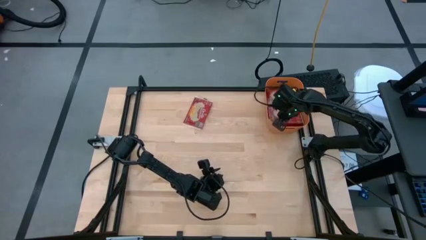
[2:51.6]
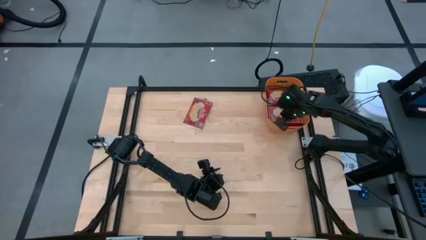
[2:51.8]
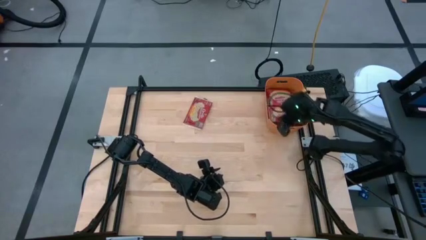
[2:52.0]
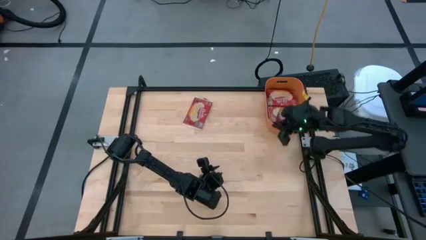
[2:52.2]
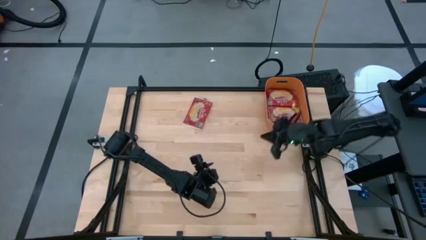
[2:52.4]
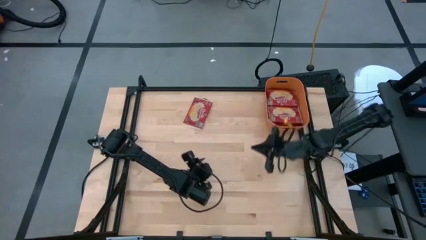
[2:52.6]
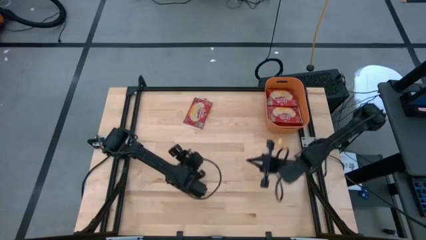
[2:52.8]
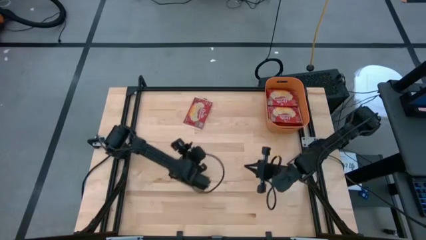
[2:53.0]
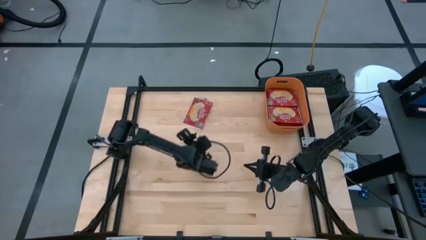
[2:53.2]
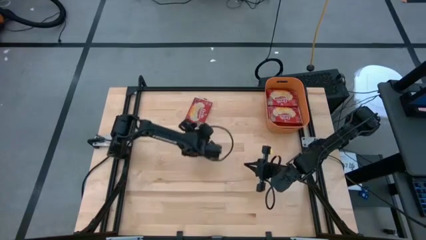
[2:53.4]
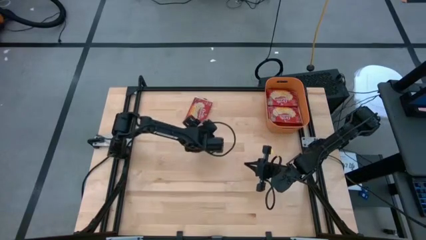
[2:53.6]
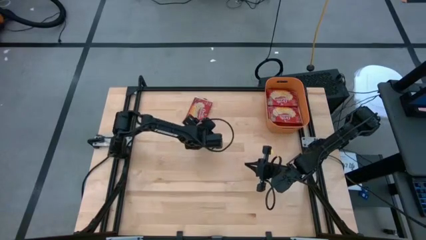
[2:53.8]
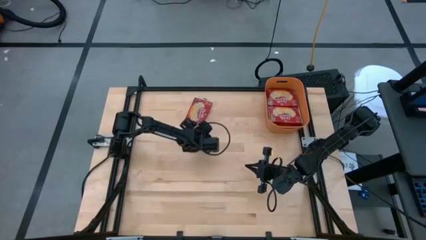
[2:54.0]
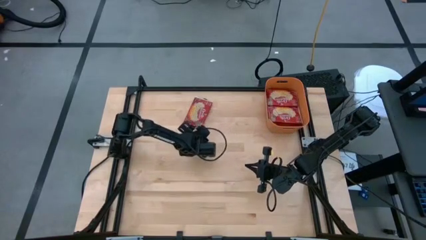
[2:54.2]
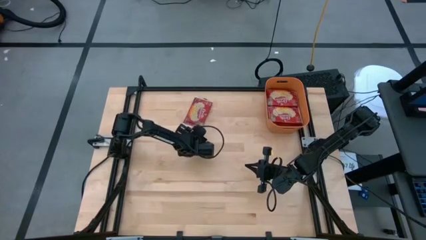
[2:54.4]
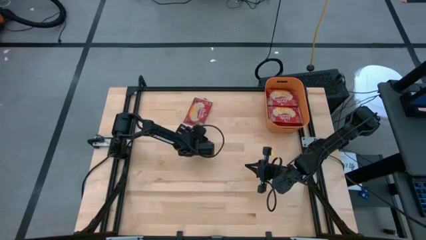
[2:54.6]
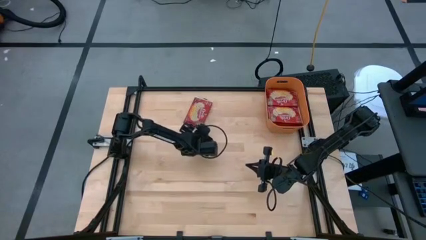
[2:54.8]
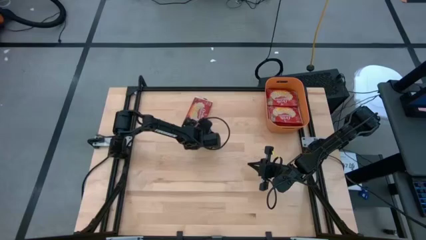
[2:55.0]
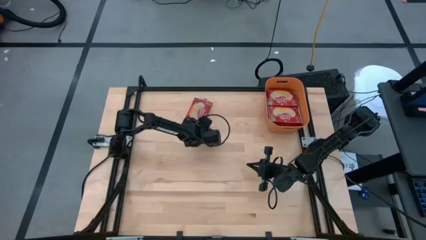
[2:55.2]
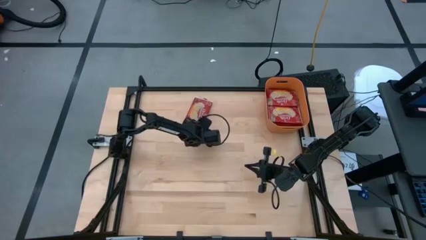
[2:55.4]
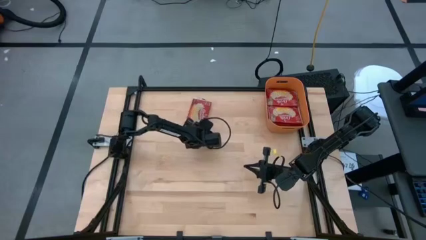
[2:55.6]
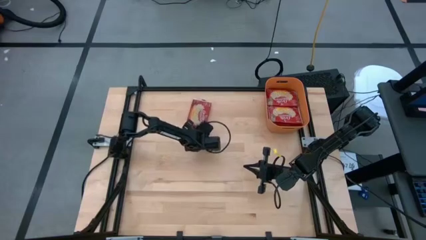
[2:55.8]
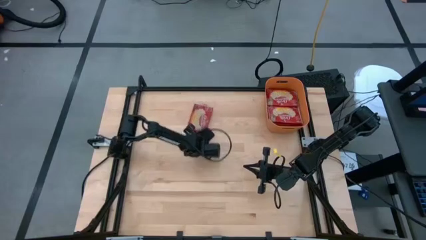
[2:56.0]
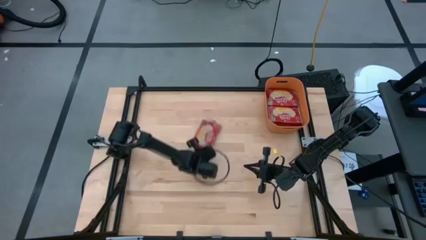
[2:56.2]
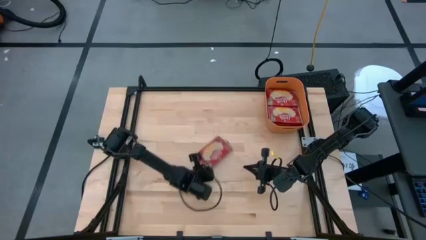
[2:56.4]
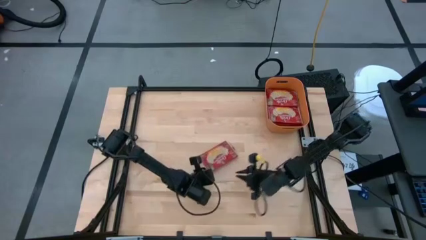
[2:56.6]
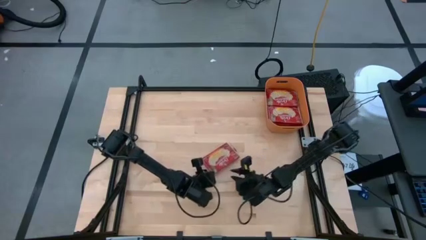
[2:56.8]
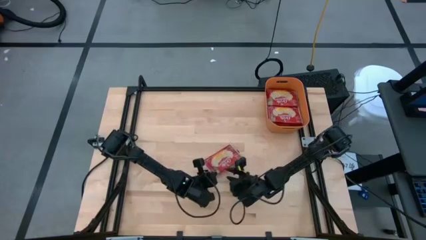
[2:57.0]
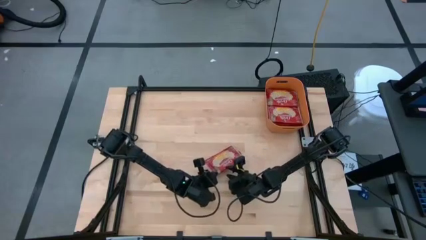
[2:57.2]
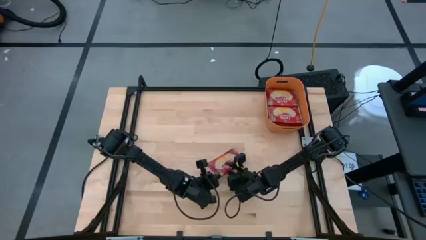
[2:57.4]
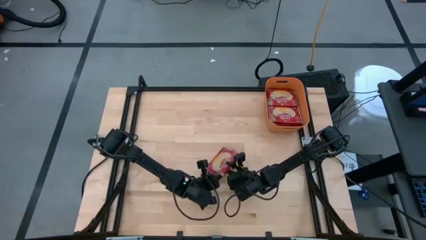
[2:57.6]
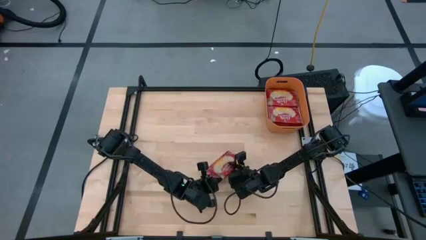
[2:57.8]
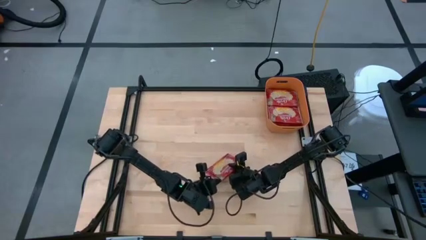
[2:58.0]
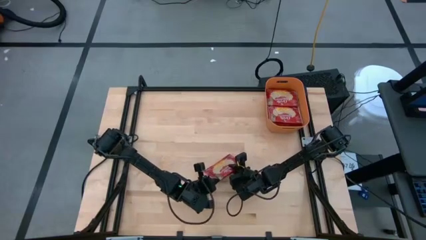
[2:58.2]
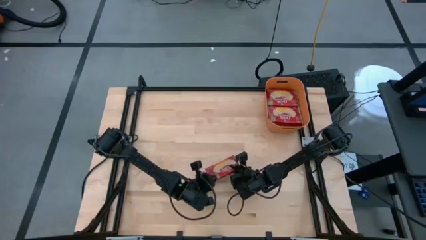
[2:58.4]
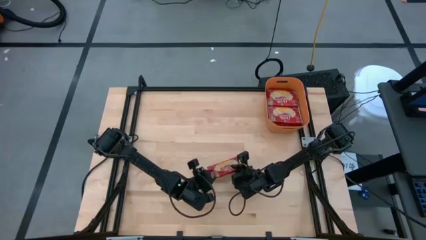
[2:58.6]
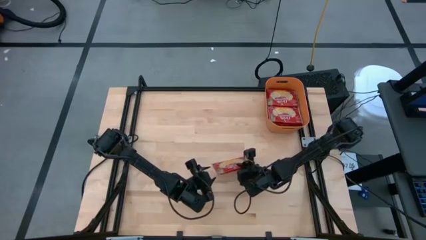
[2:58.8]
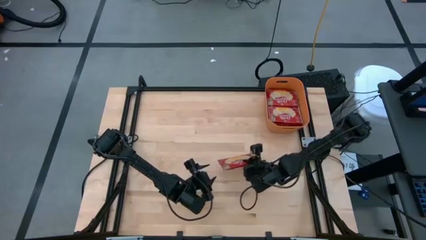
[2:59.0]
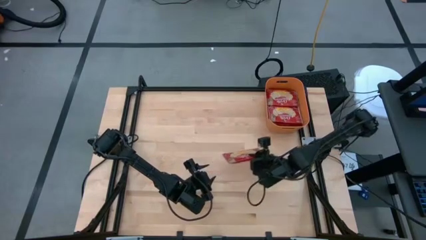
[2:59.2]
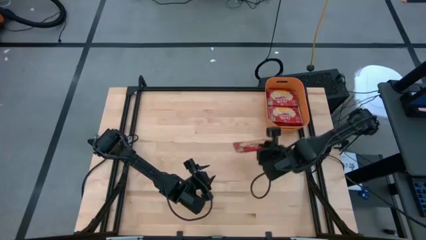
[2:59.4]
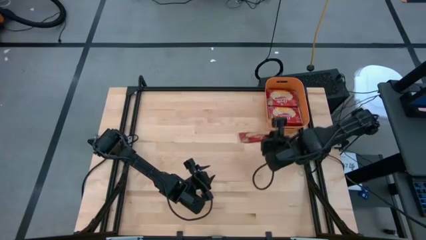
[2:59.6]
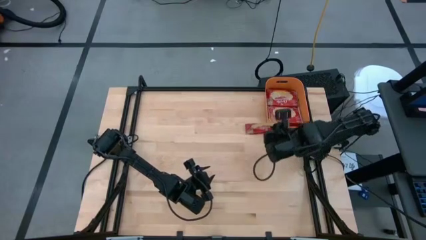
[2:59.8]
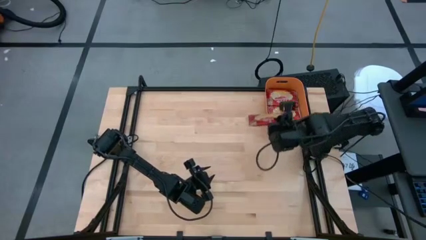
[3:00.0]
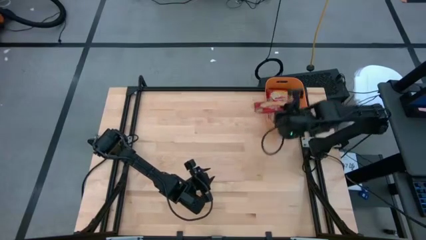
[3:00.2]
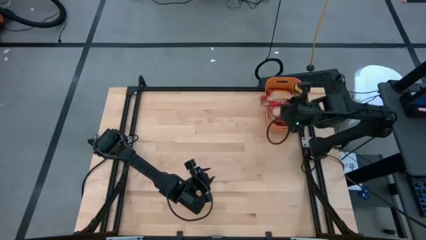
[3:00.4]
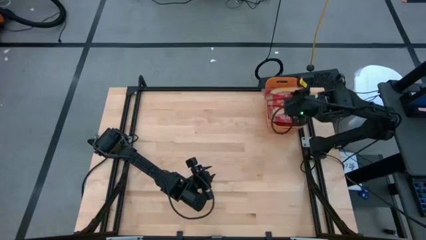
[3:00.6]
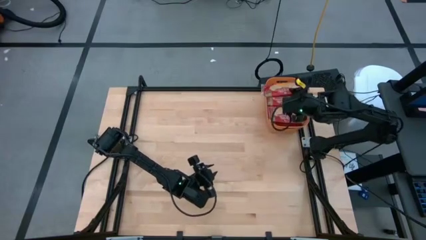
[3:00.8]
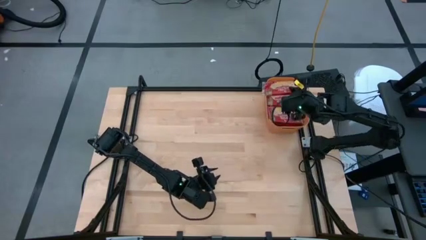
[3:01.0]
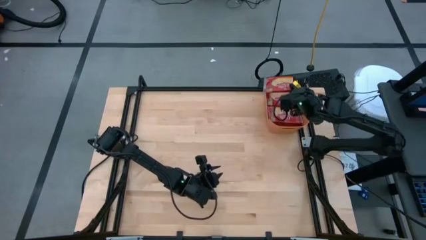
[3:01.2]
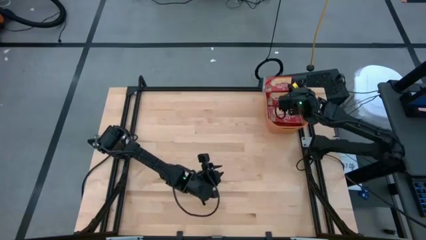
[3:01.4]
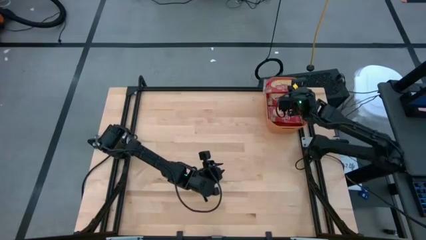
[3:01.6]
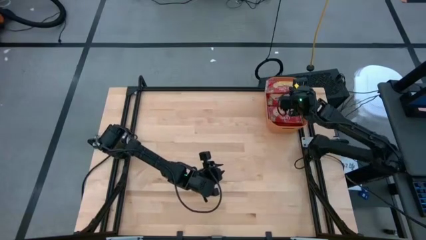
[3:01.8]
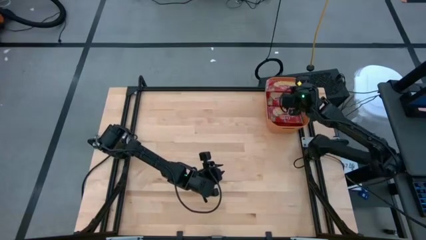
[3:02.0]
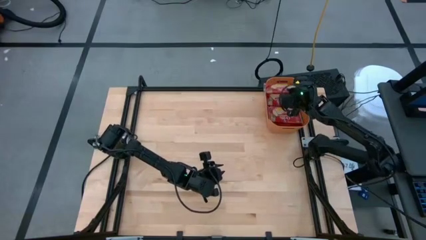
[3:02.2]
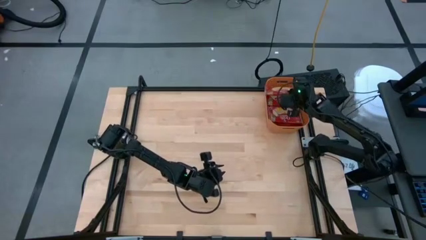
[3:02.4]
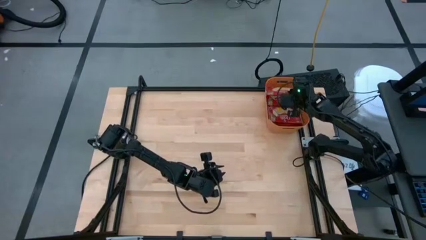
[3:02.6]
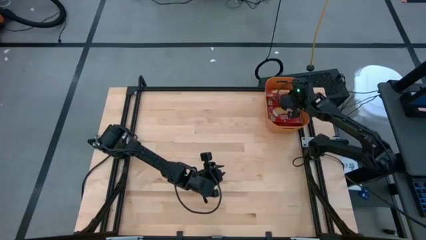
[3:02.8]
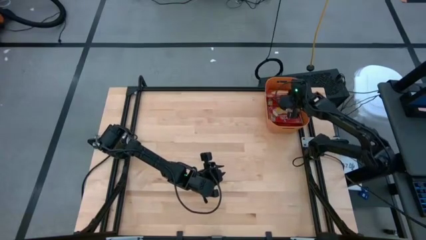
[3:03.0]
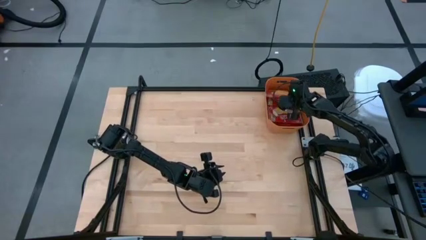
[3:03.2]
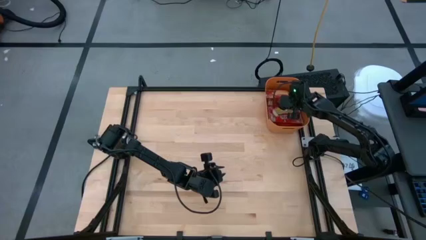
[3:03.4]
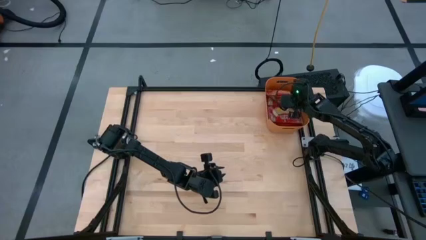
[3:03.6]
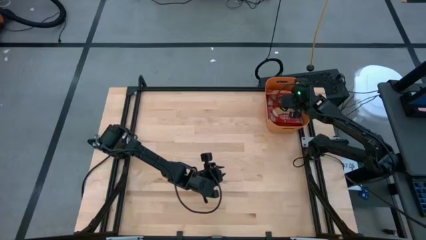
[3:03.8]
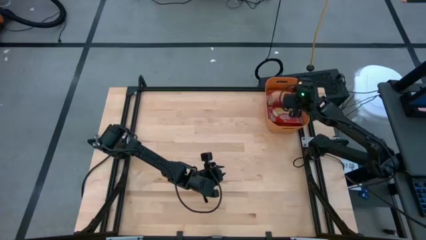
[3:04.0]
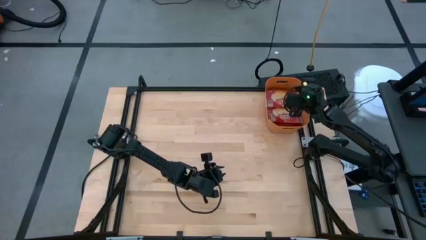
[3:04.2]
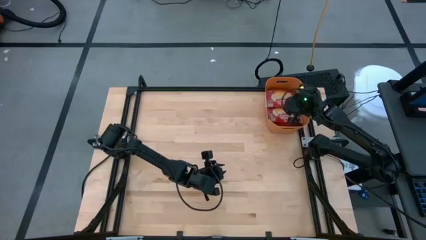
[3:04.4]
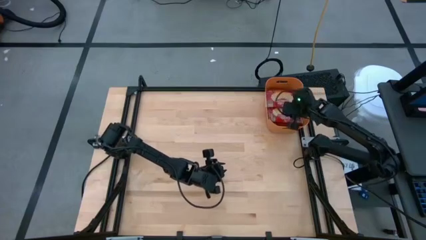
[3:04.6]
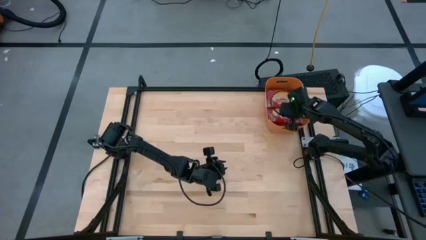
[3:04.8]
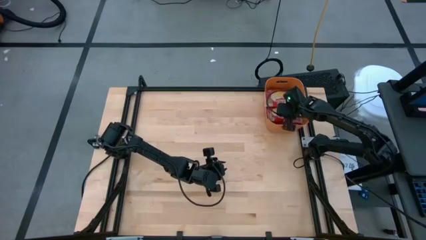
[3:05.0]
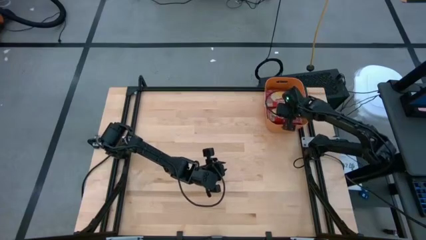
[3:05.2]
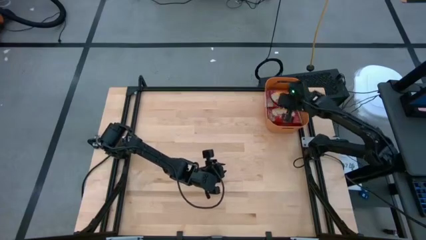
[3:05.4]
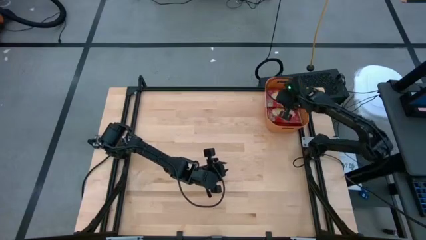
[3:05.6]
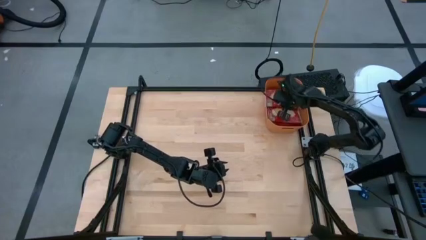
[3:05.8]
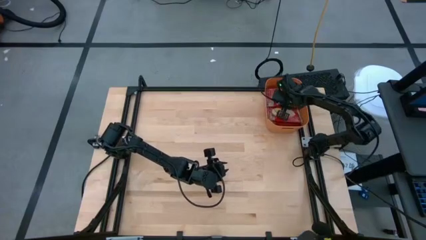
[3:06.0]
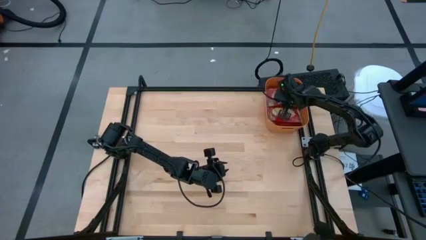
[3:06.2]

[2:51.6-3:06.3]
Task: Sort popcorn bags into baskets
Put the red popcorn bag into the orange container

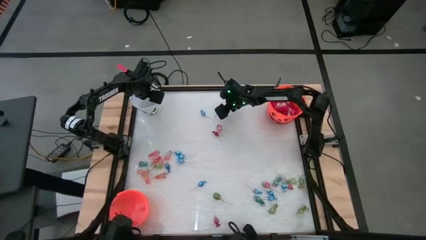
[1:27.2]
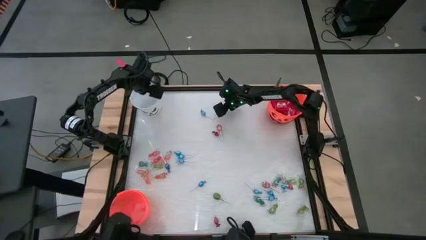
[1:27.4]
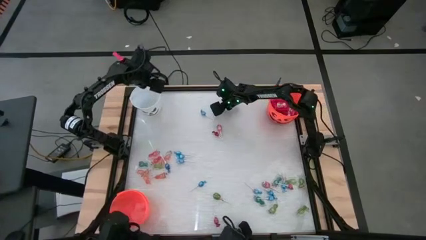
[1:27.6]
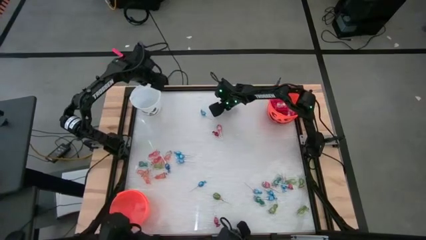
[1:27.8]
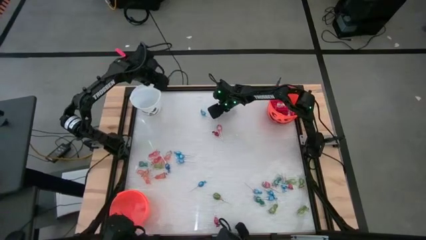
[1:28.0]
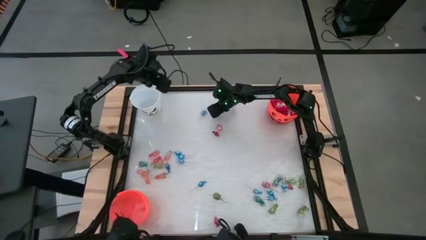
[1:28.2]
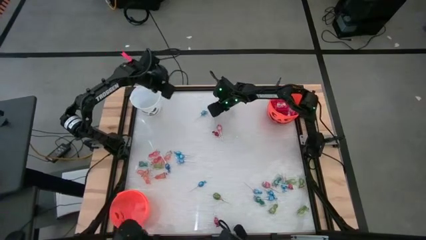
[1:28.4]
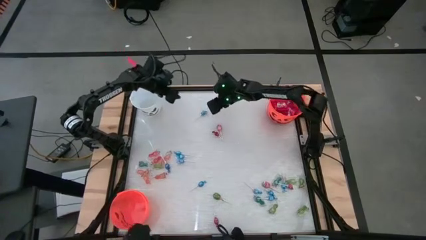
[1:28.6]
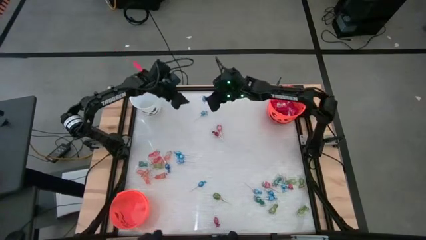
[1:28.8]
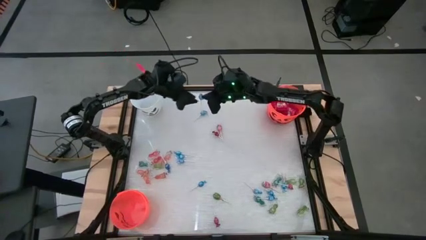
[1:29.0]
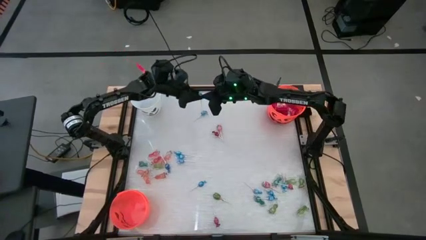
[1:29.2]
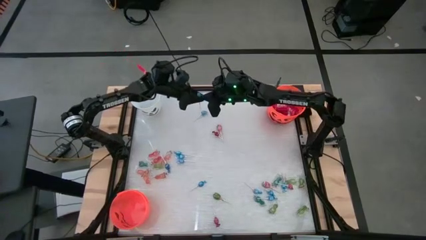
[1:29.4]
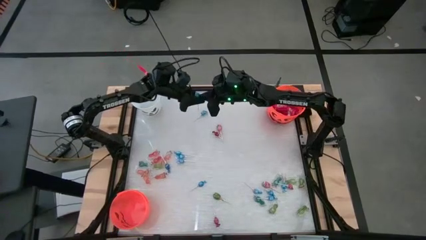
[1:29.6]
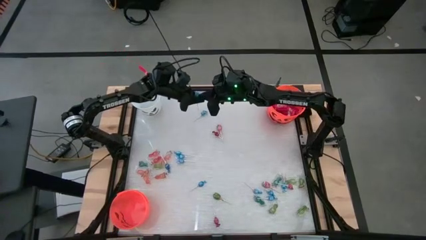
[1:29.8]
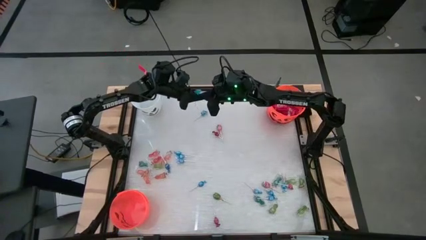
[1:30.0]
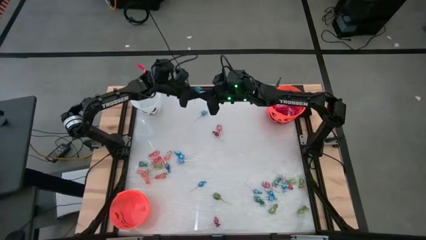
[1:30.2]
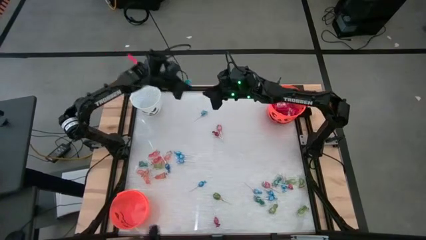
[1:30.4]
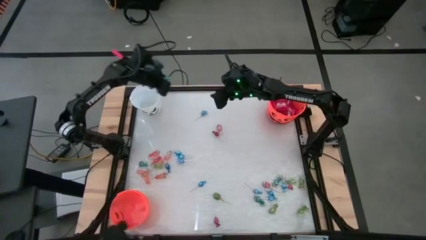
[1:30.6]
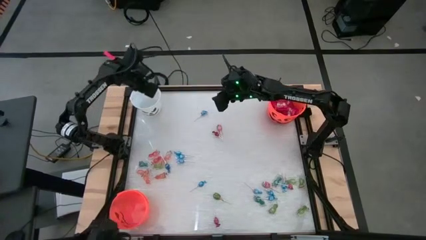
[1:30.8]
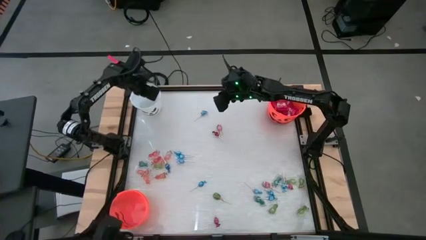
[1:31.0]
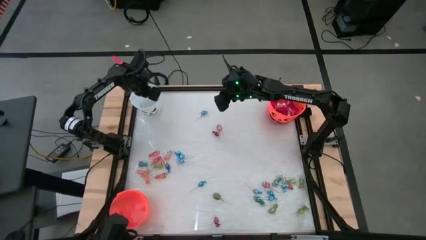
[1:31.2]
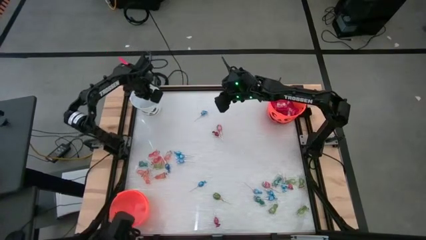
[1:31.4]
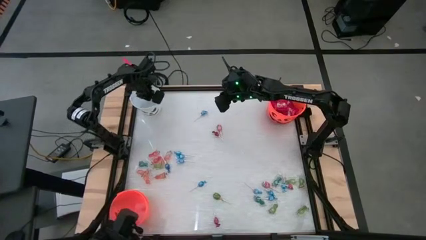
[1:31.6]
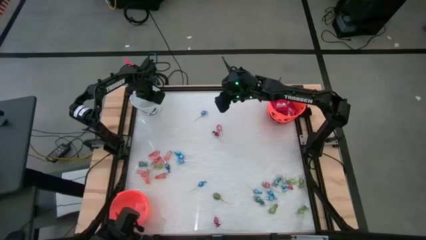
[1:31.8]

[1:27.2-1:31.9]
Task: Sort candy by brand, put in halloween buckets
Put the blue lollipop into the white bucket
